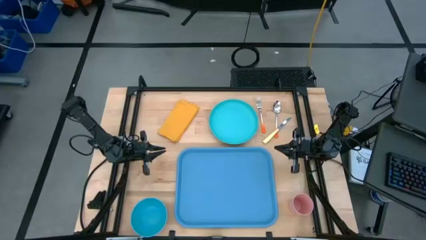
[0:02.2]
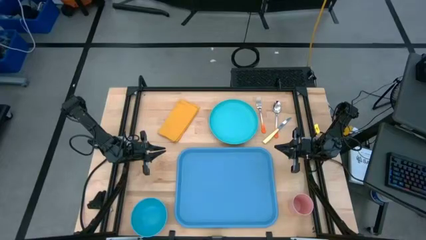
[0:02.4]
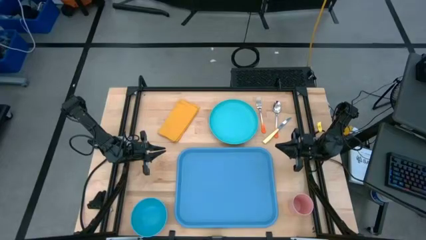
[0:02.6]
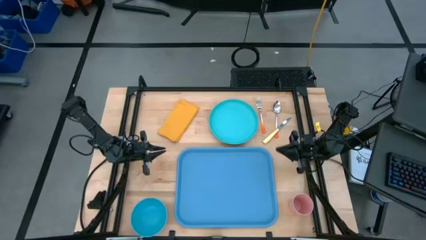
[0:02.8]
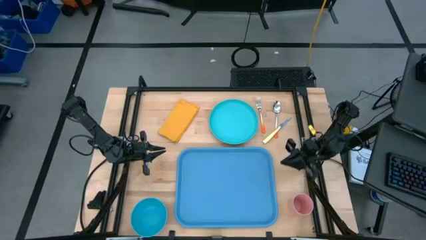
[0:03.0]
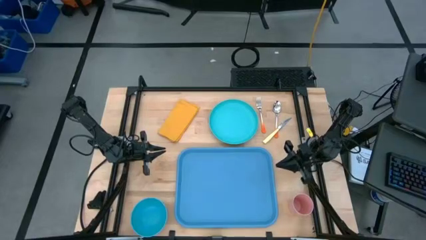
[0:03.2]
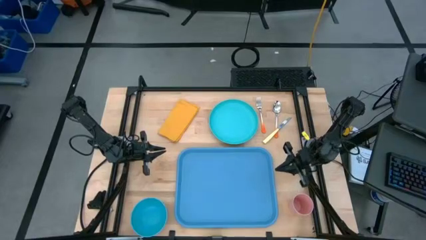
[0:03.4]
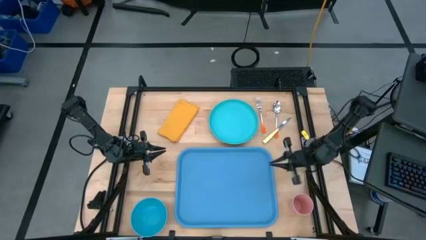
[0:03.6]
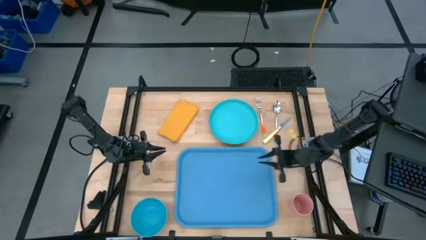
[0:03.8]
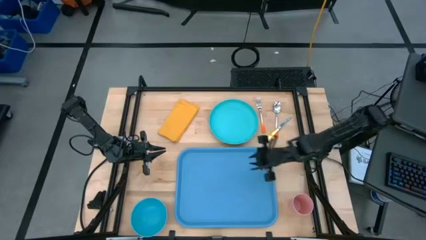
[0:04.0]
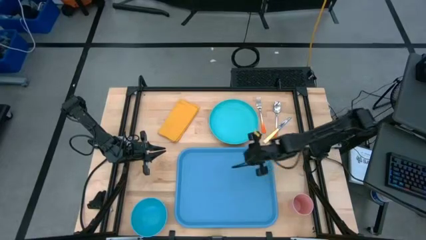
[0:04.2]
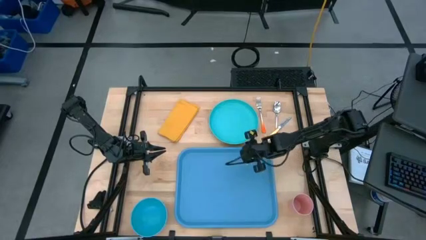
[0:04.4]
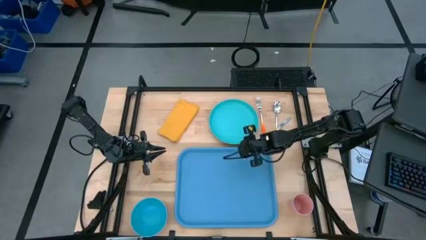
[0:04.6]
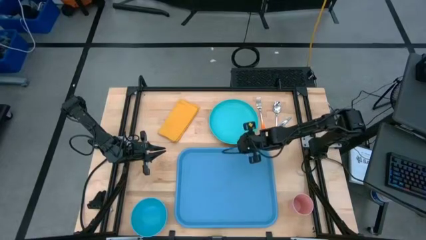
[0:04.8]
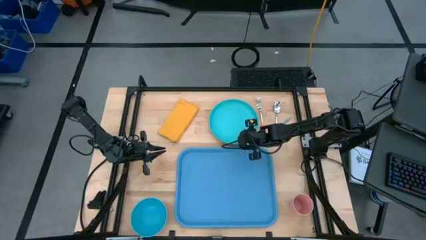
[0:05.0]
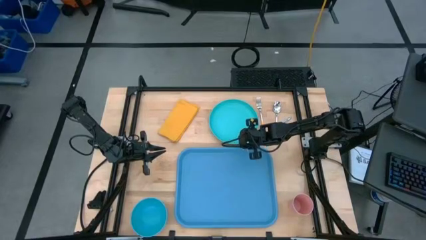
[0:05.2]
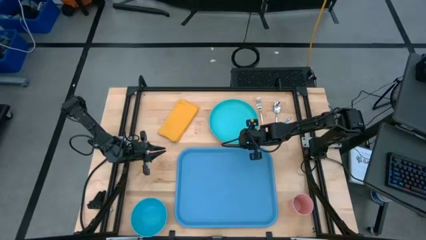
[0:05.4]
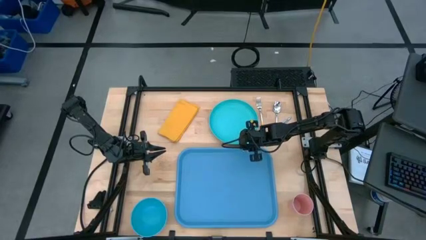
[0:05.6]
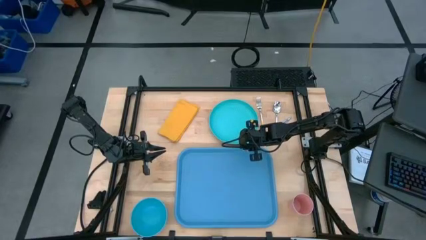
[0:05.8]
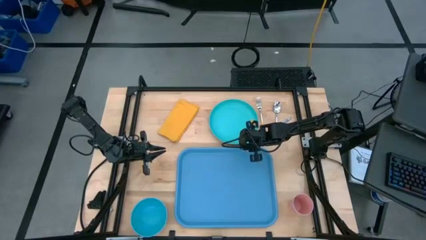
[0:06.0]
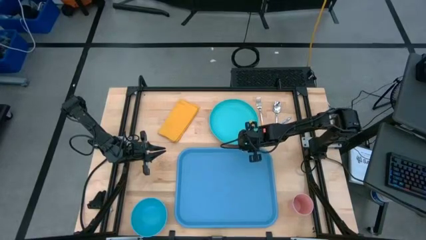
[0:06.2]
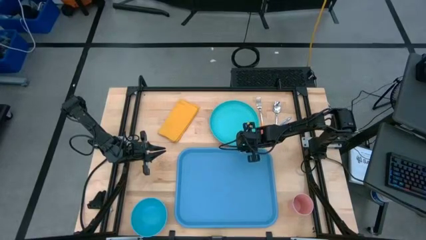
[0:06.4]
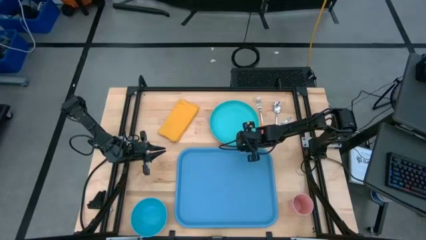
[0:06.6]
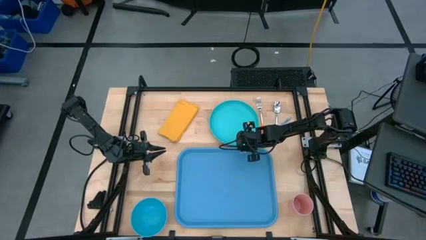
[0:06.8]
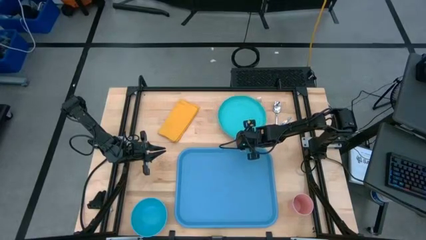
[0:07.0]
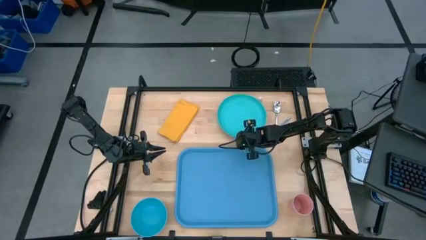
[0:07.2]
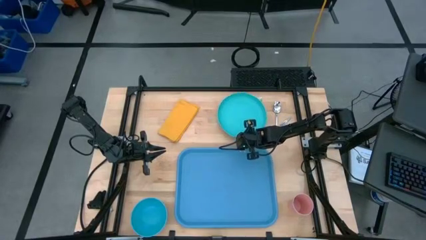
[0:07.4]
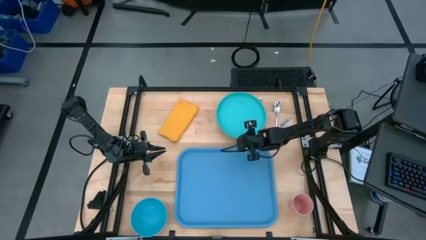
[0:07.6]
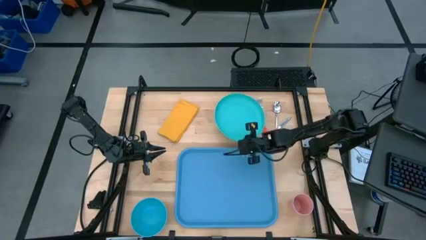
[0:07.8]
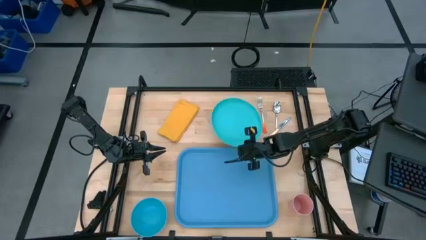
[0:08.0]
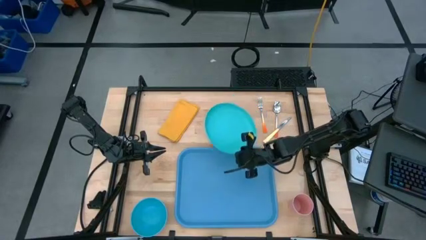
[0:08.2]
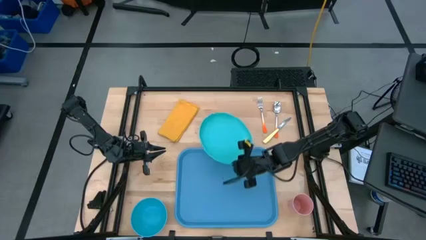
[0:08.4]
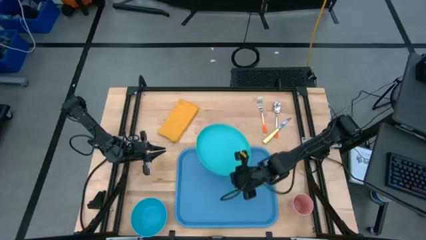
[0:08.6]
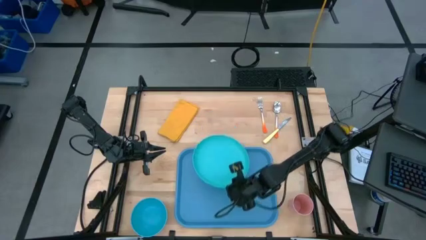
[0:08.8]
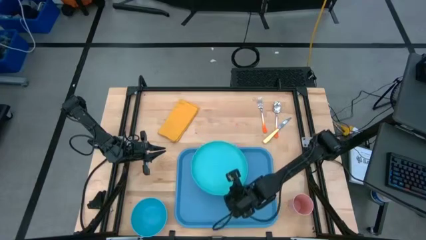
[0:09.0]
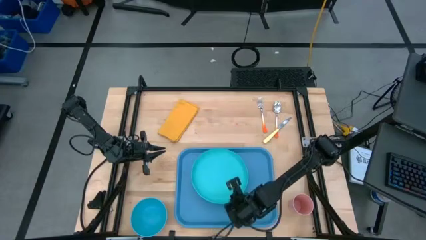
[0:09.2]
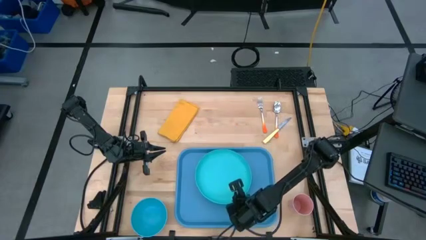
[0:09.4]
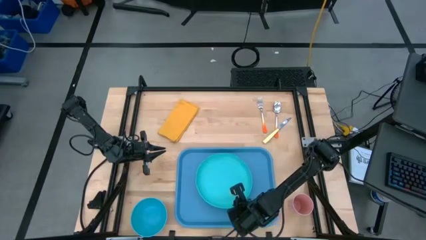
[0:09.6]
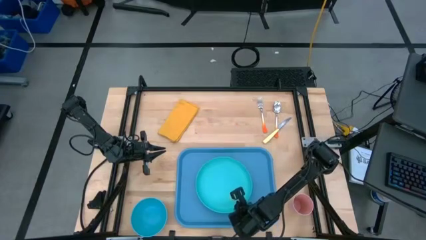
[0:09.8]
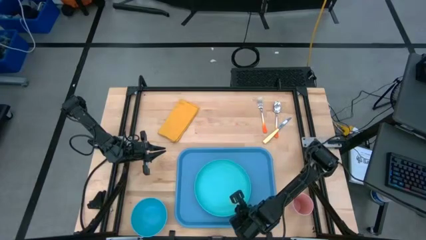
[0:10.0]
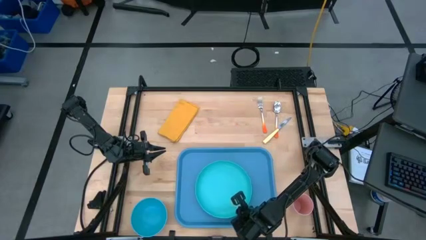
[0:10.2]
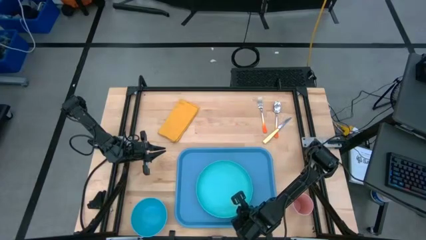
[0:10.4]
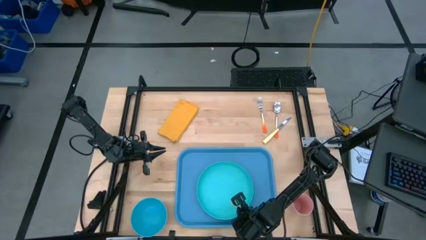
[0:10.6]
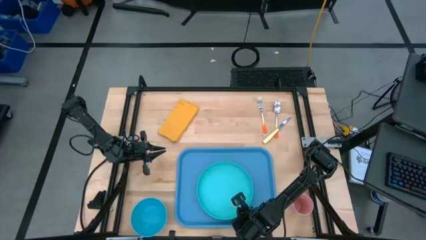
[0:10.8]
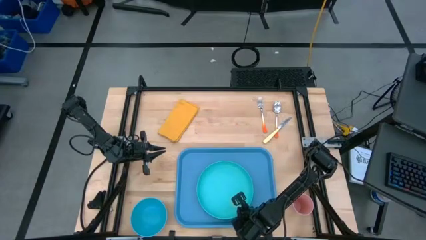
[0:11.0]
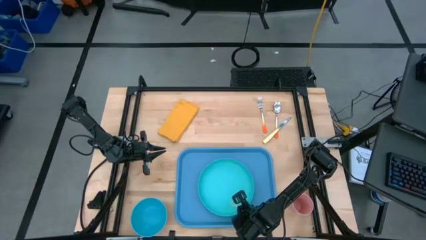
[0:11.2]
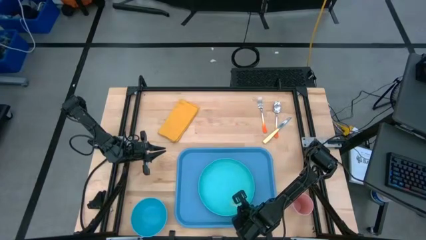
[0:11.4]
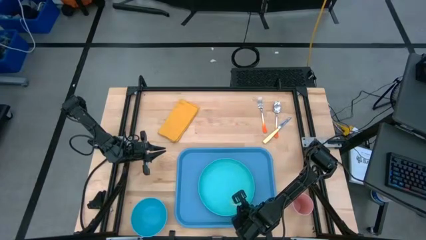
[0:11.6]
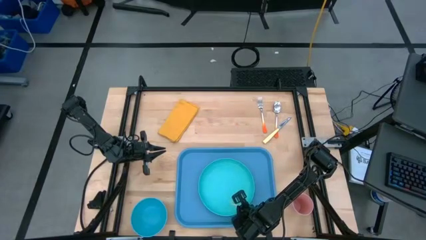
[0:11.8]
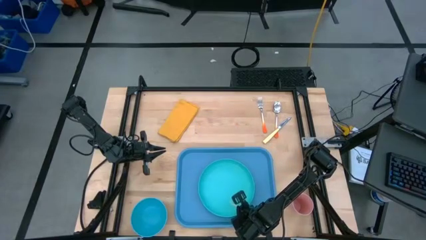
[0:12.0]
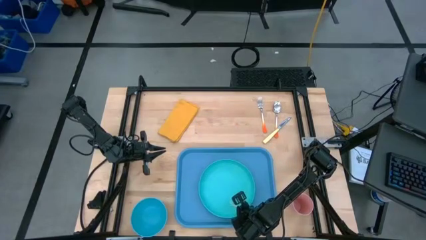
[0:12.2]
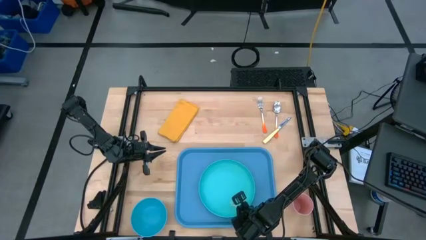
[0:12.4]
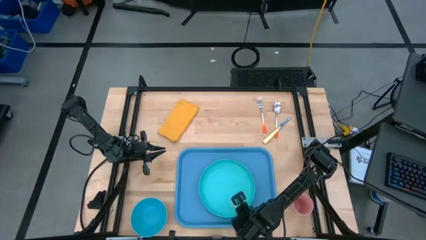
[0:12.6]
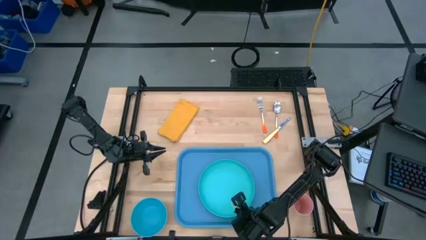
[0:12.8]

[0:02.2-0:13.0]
Task: Set up tray
Put the plate on top of the tray
